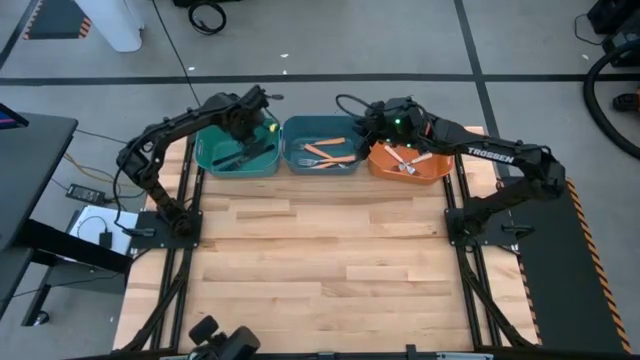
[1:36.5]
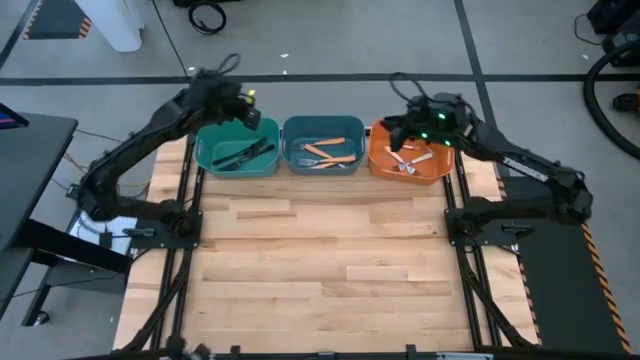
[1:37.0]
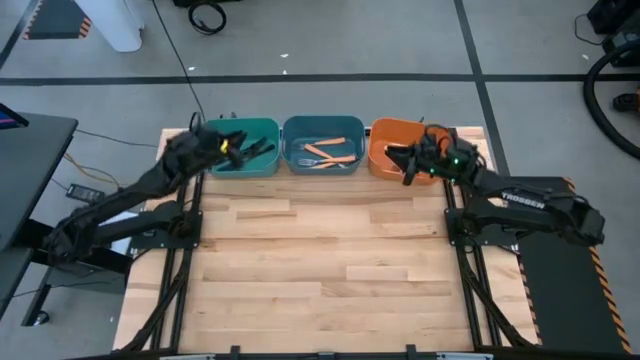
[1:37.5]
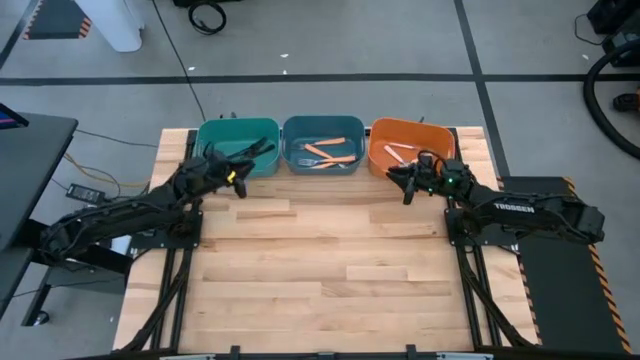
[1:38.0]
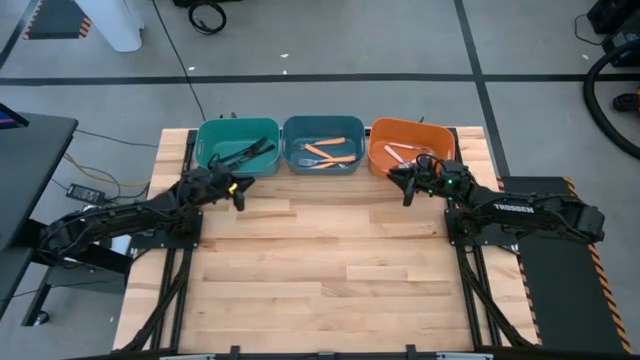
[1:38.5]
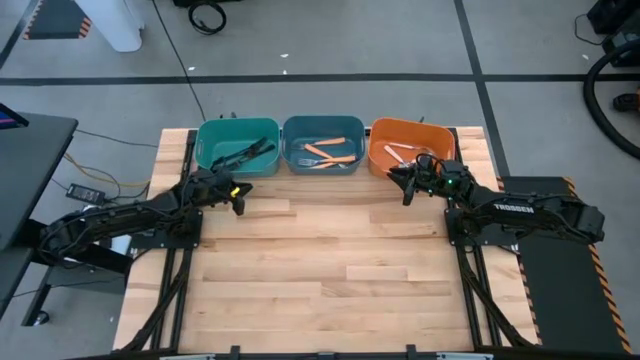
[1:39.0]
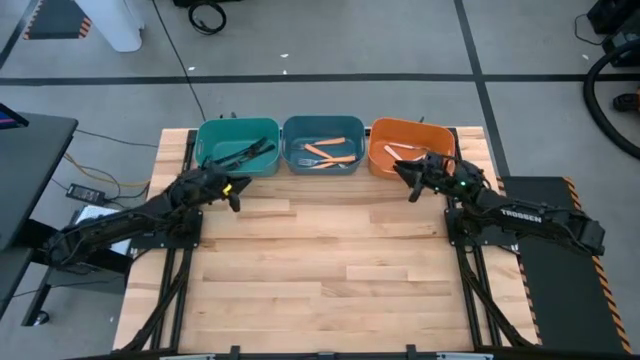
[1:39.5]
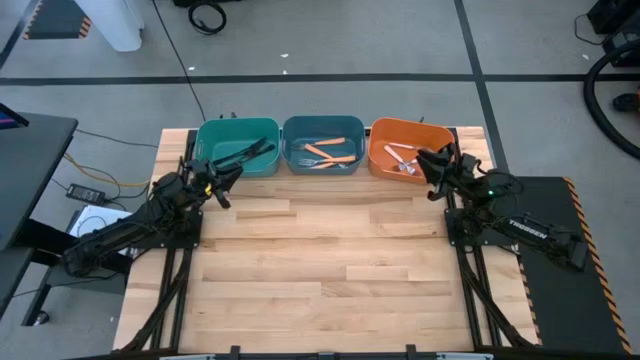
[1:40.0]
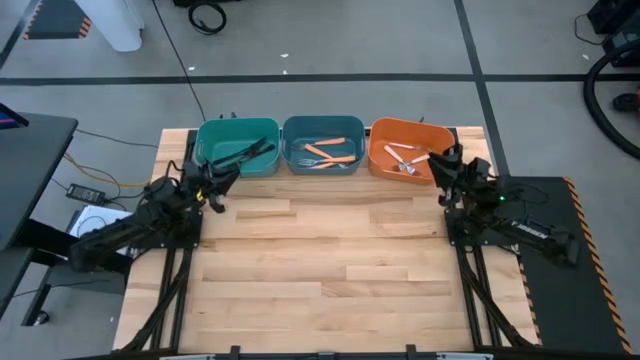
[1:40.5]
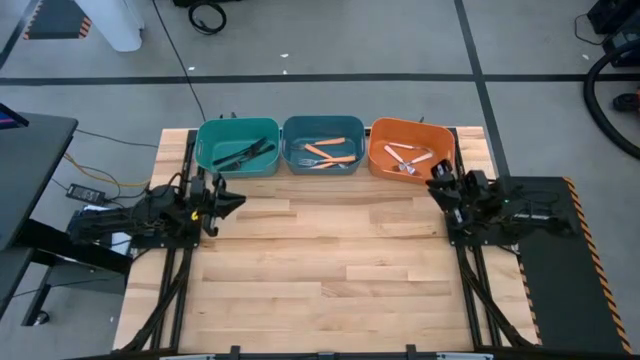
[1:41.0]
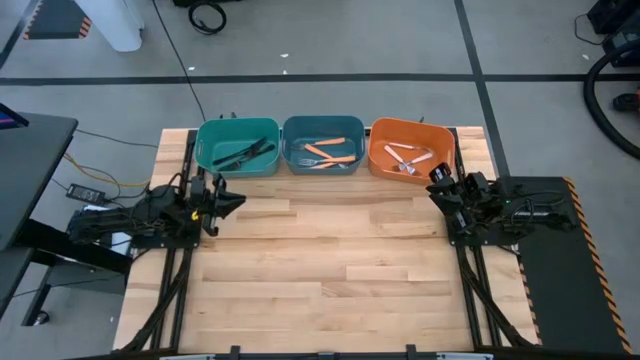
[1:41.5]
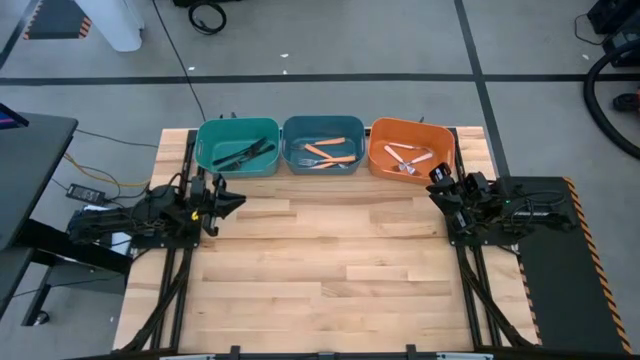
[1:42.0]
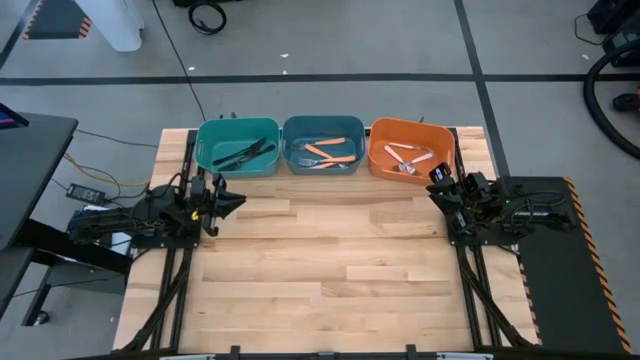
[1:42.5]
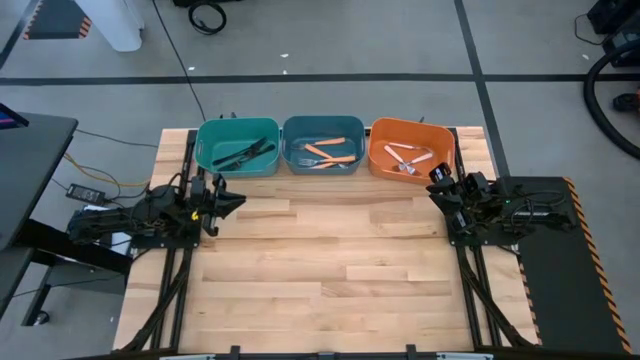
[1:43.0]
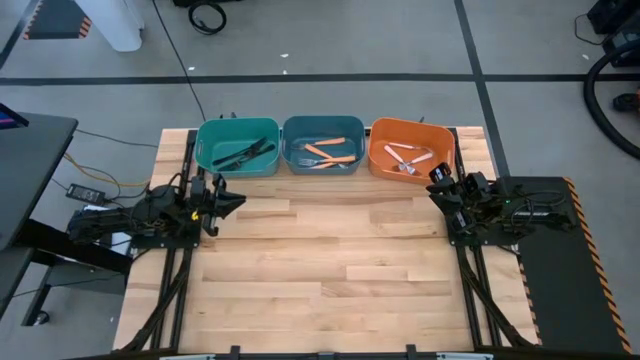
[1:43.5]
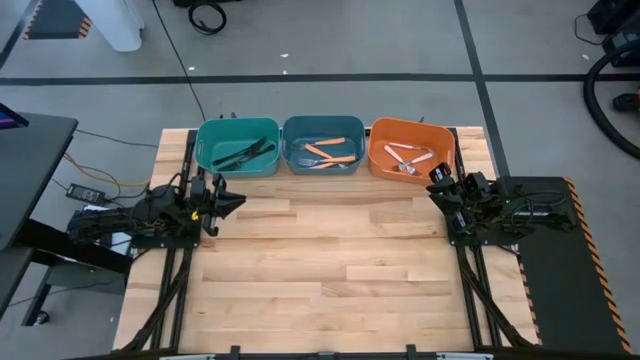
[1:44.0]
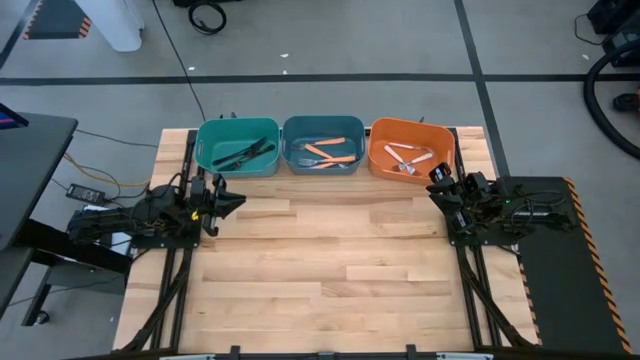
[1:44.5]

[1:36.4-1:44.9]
Task: Sort silverware by color (type)
Return to Home Position

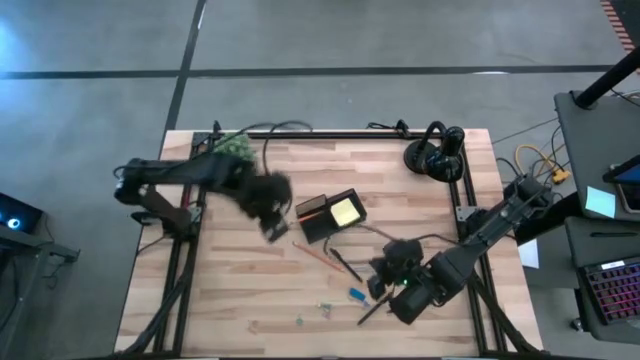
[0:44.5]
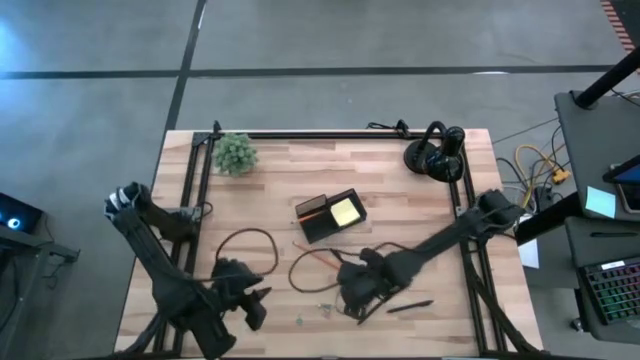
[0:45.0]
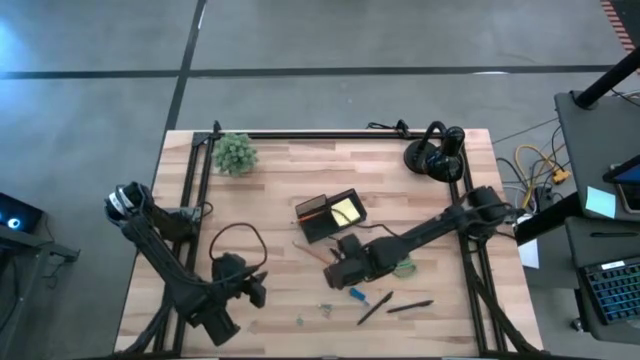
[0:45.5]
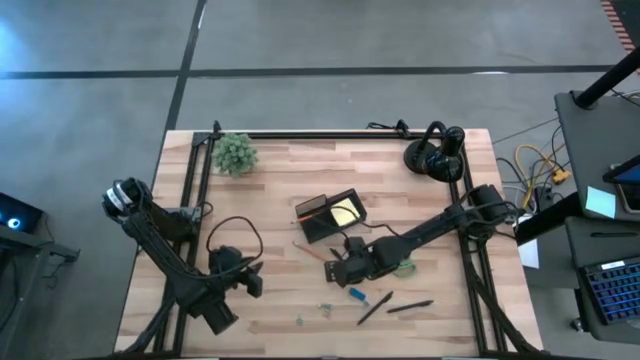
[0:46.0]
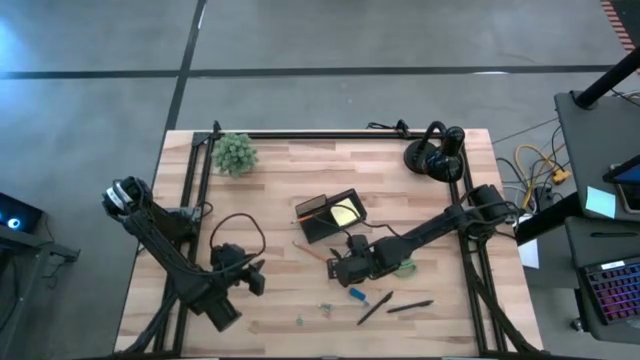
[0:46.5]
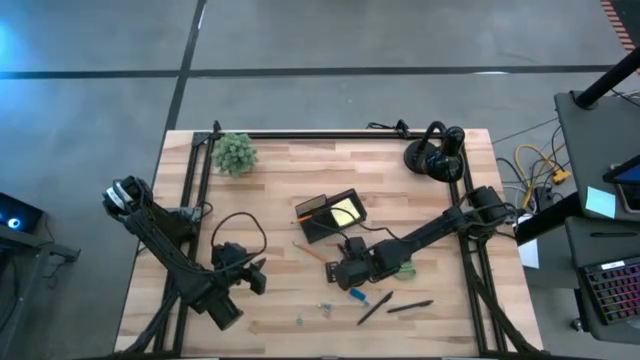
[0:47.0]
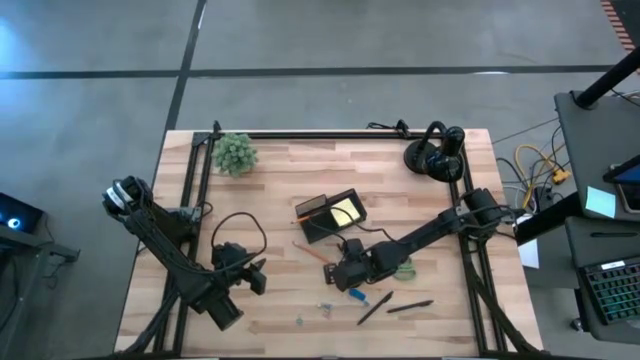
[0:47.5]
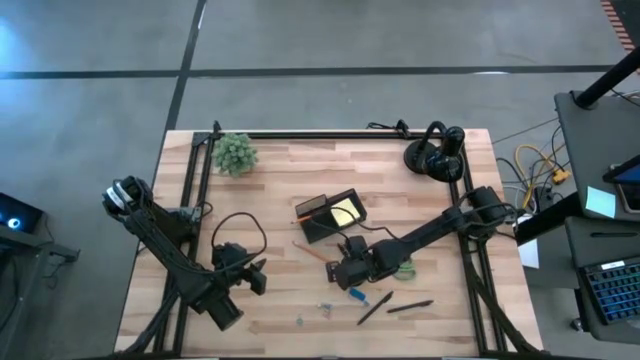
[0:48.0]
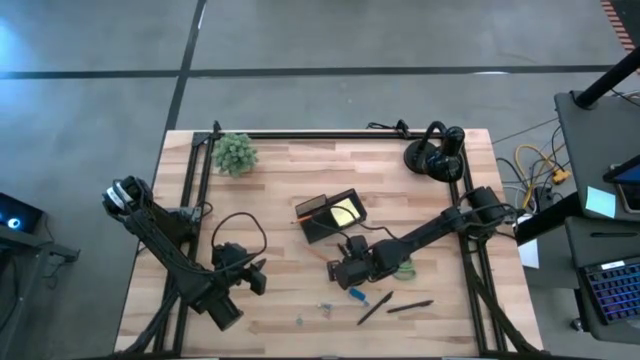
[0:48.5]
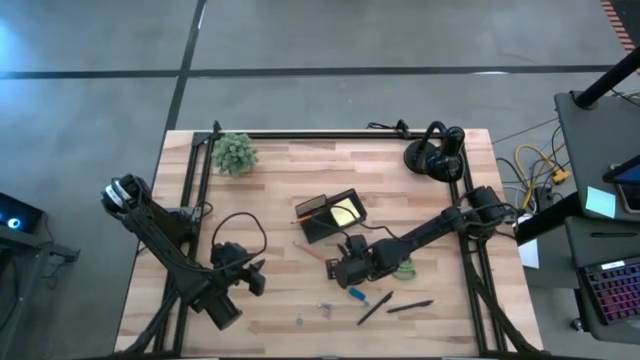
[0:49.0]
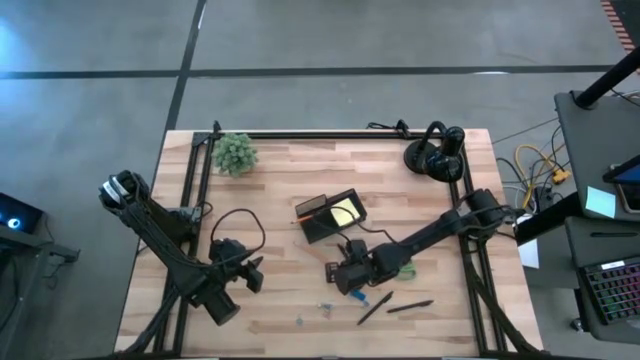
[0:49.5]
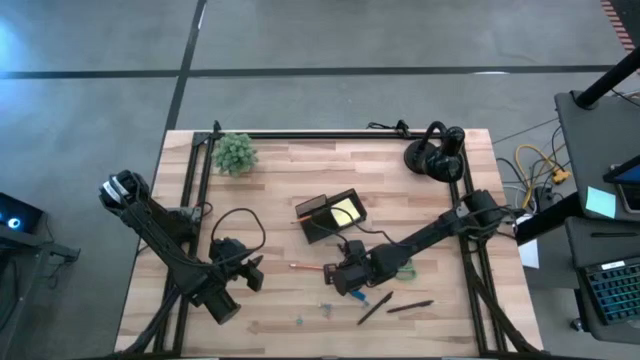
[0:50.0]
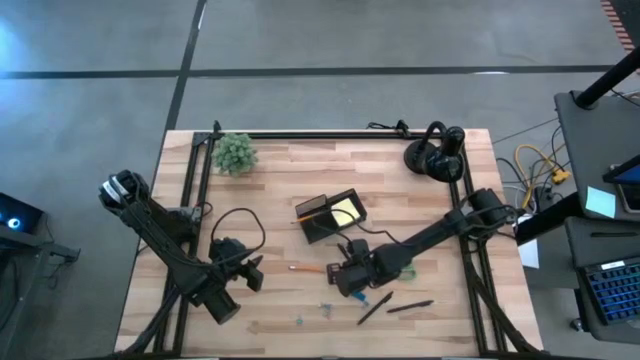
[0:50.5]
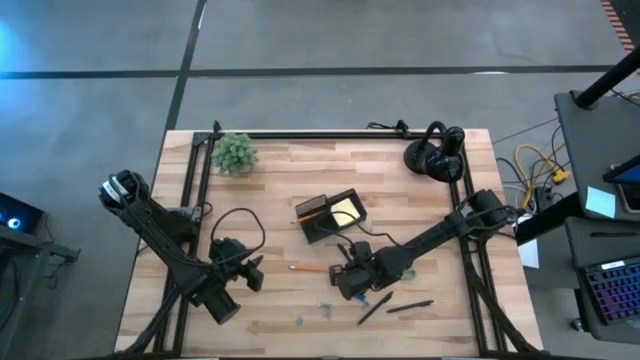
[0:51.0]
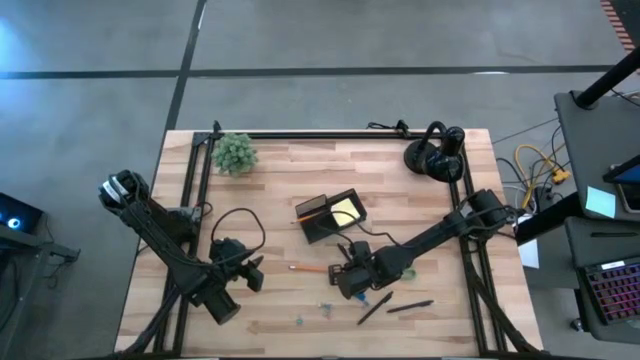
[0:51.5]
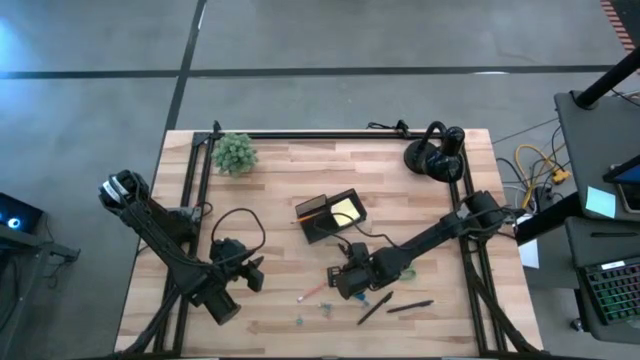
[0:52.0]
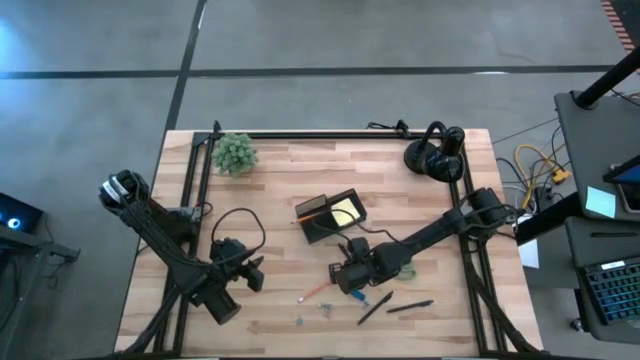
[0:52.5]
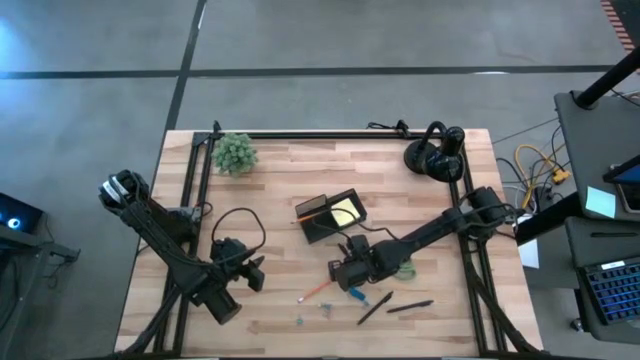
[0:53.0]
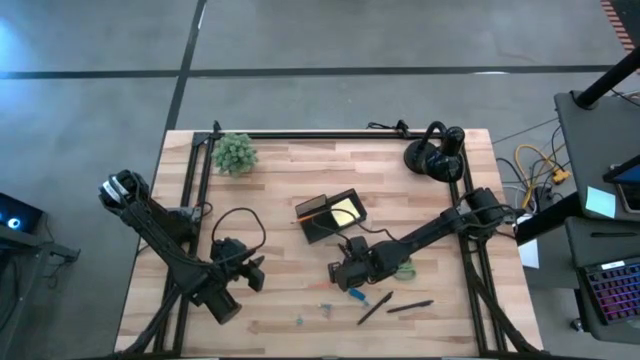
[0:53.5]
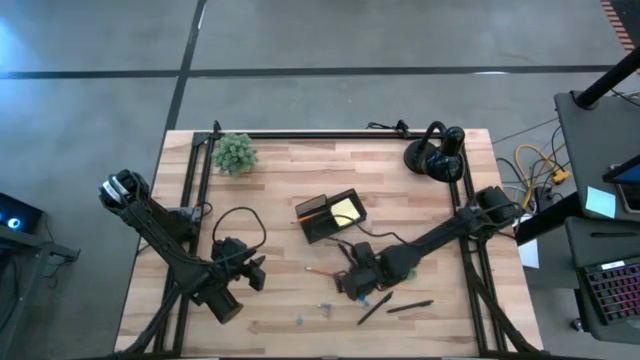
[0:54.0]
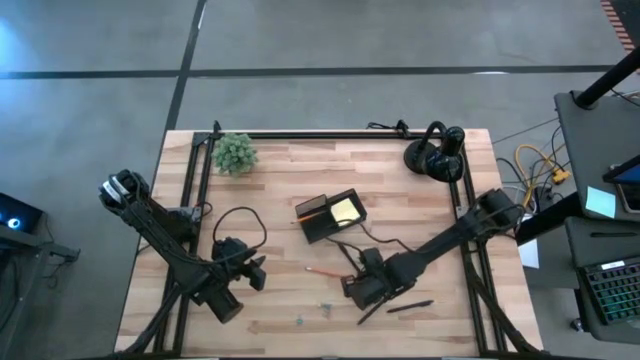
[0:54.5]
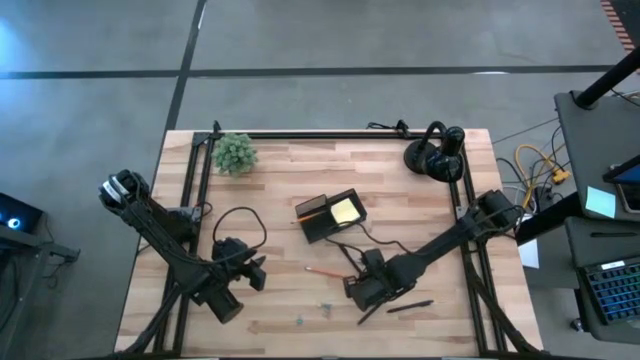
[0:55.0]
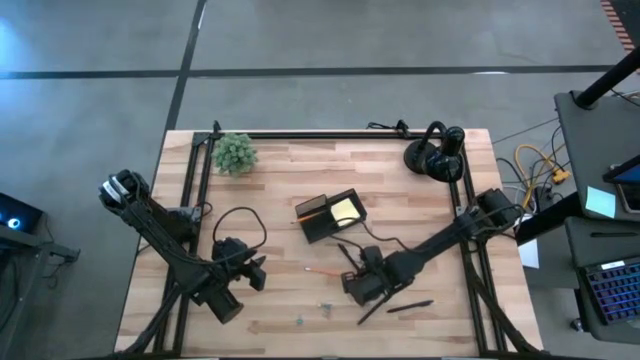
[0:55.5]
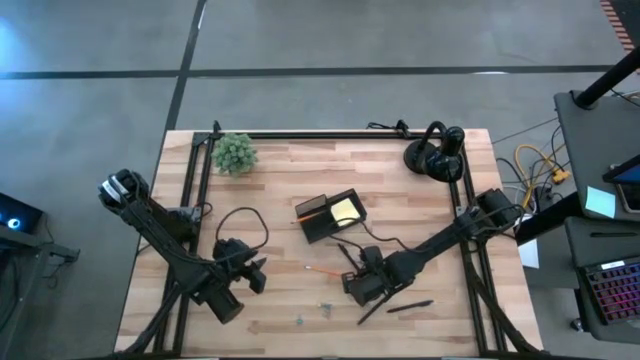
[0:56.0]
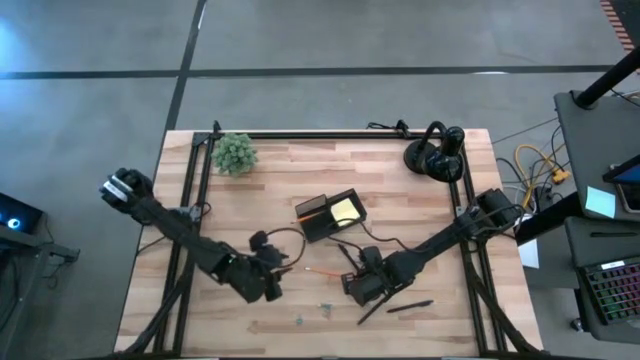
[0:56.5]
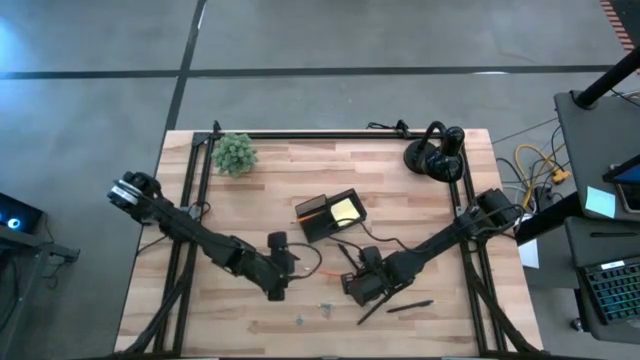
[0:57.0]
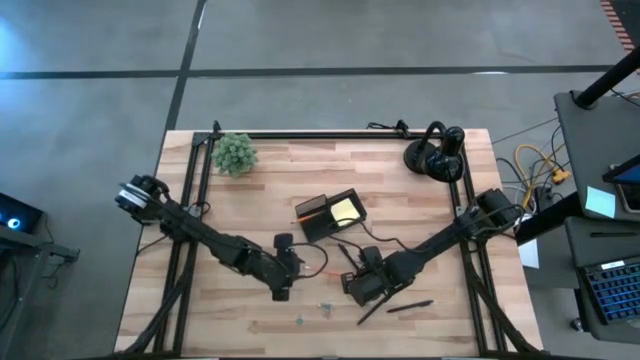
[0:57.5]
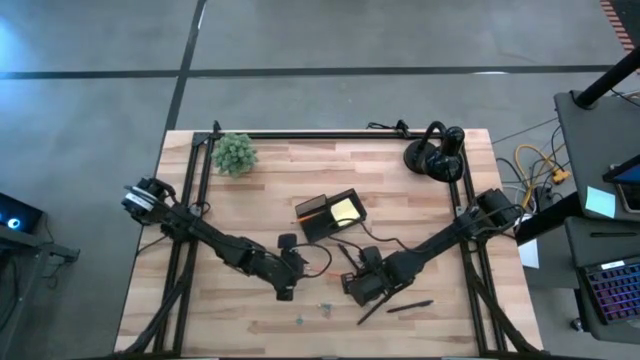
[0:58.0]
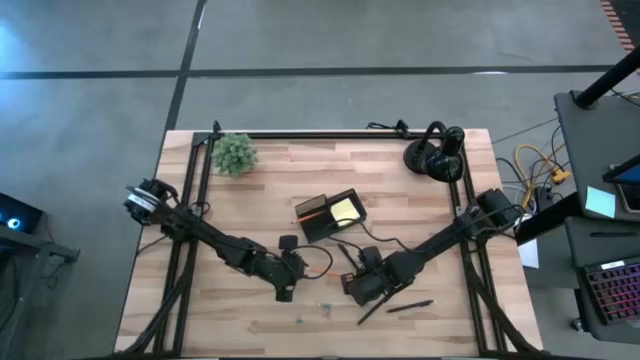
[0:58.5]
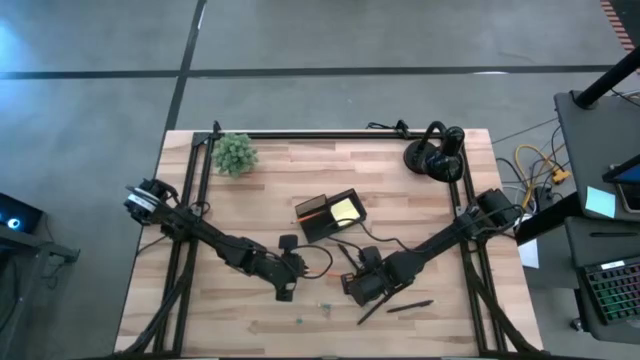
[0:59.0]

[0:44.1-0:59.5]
Task: Pick and place office supplies into organizer
Put the orange pencil into the black desk organizer
